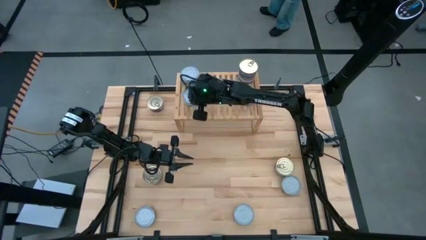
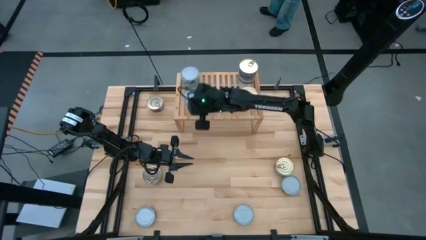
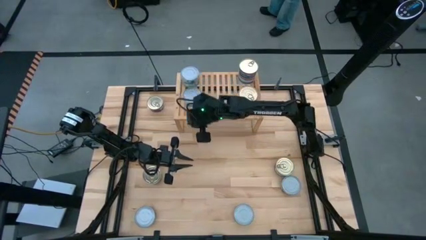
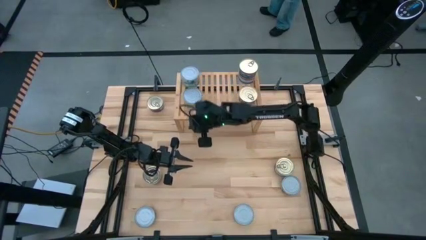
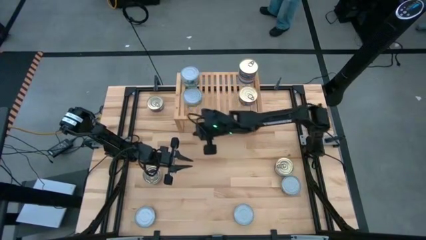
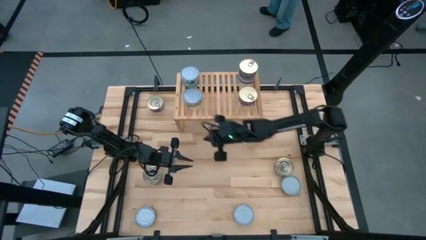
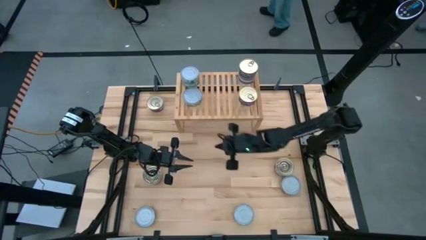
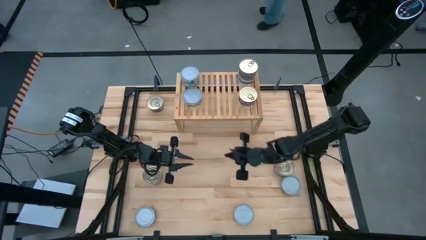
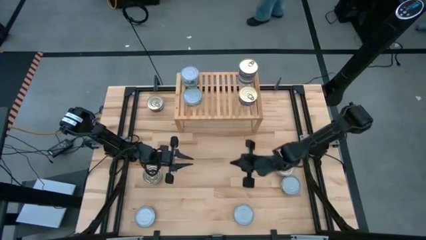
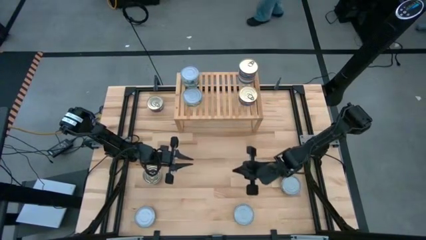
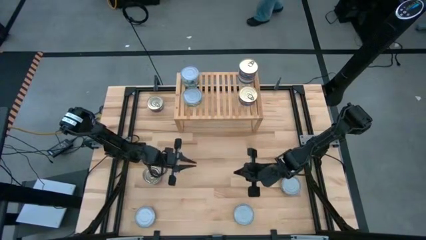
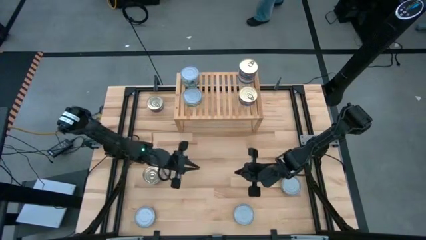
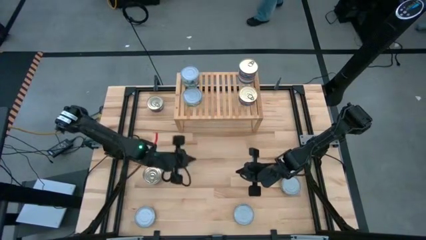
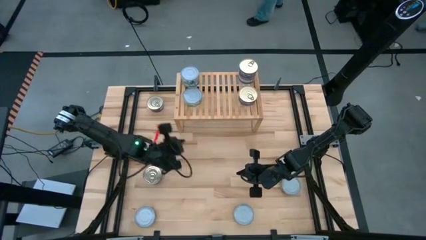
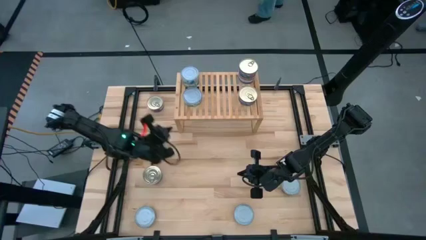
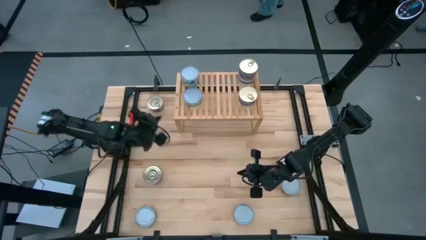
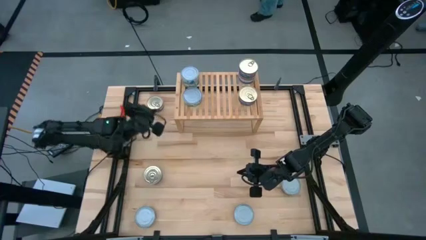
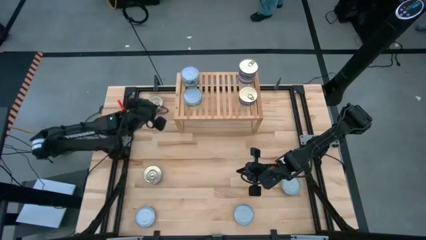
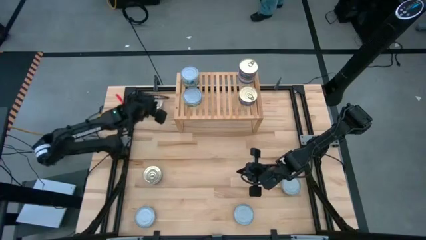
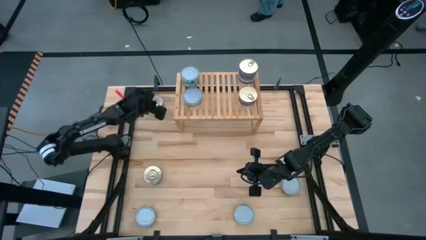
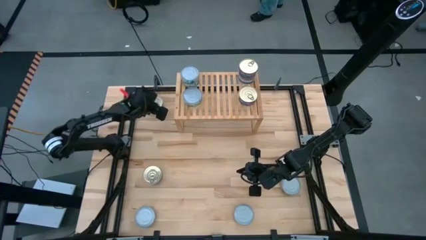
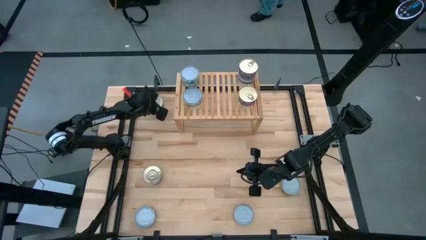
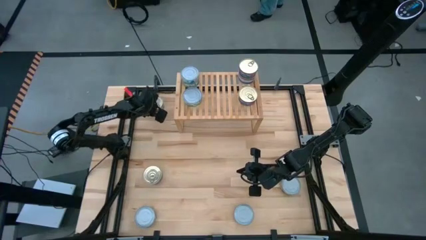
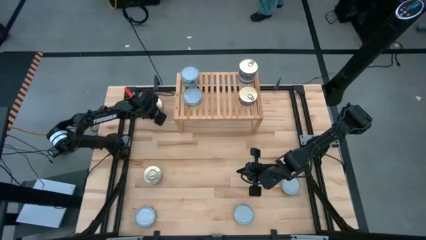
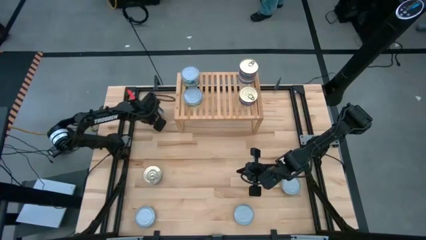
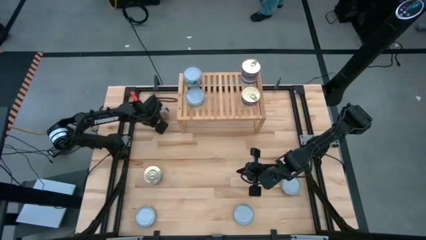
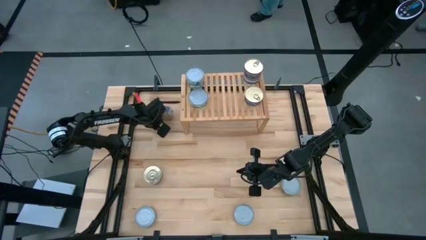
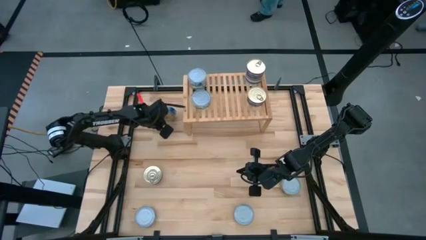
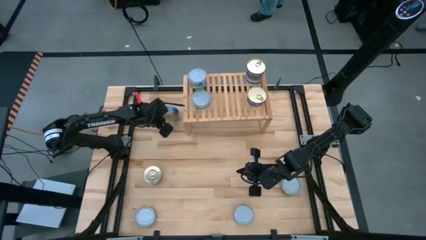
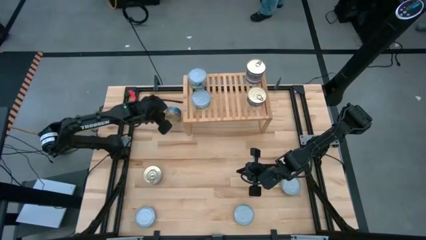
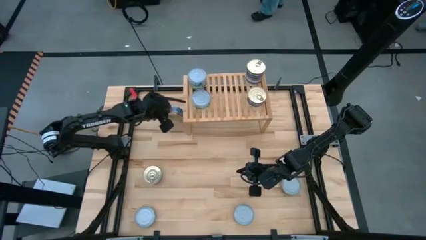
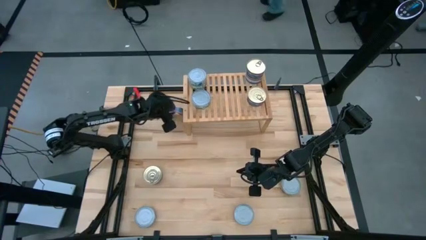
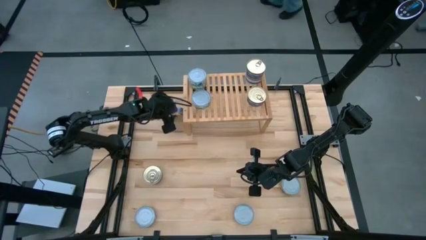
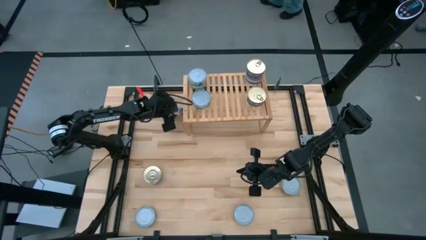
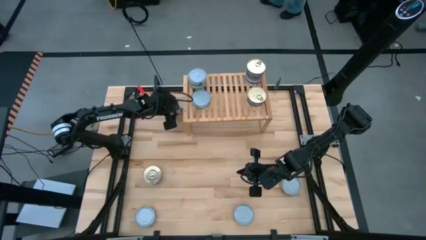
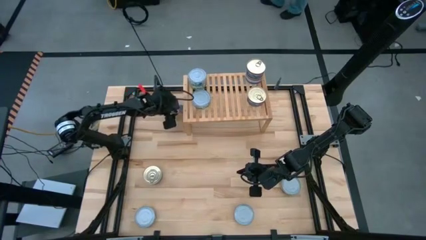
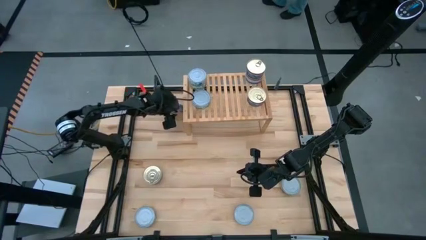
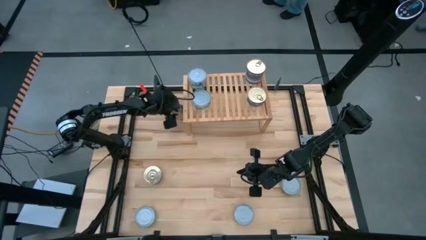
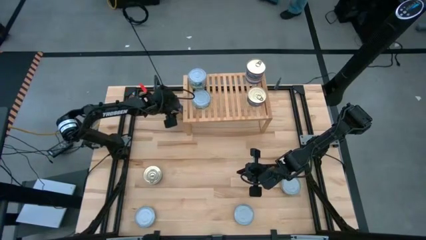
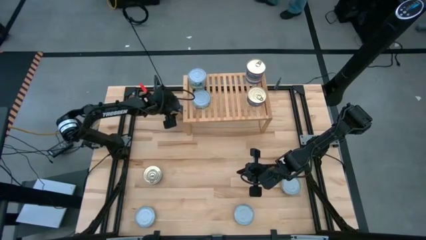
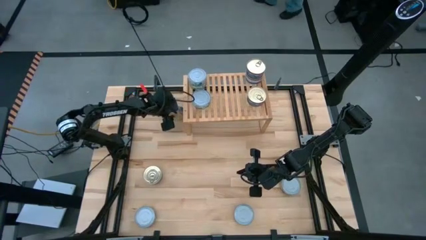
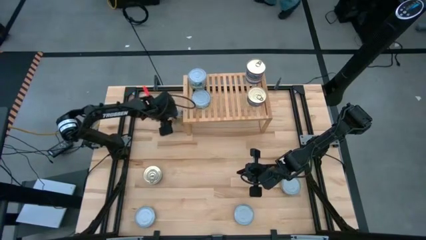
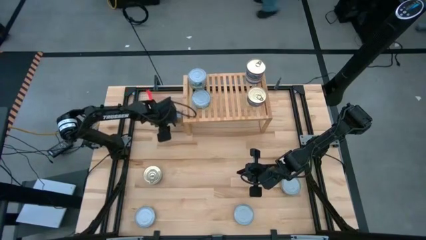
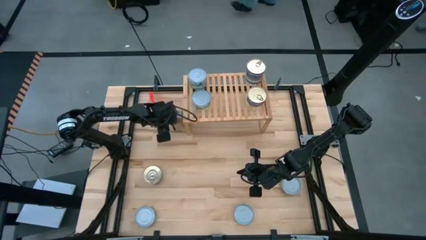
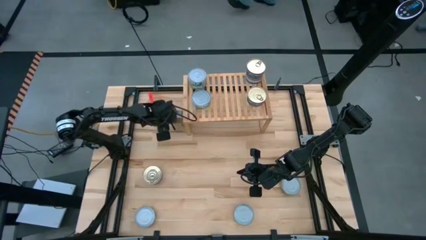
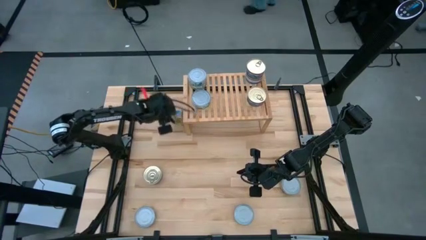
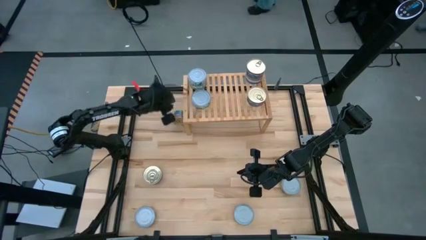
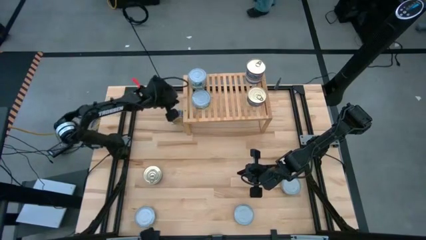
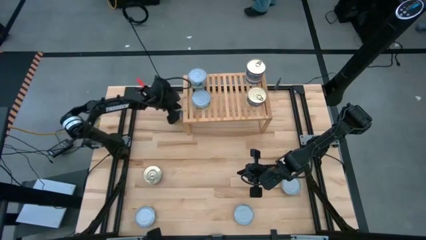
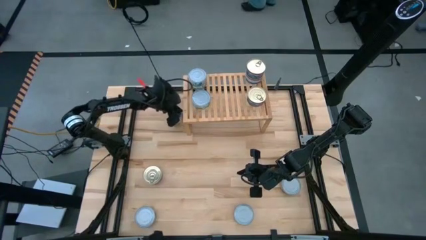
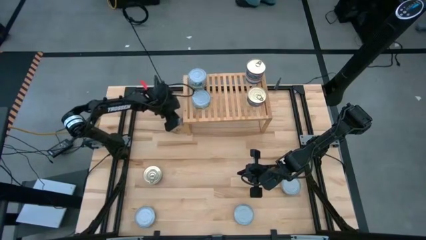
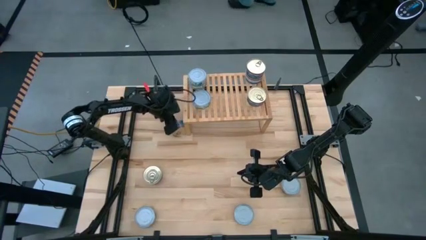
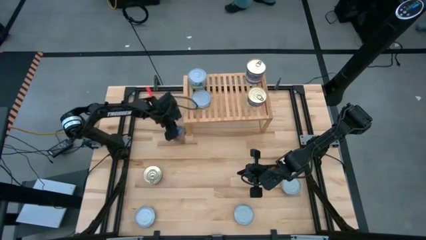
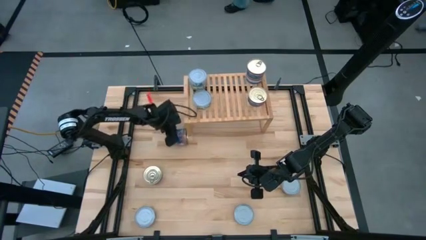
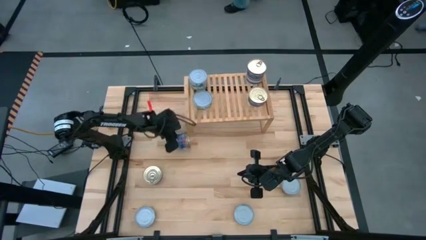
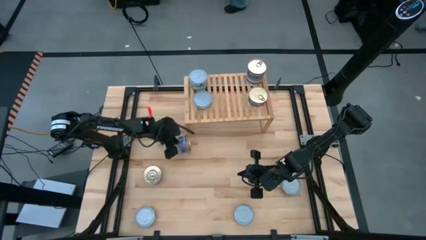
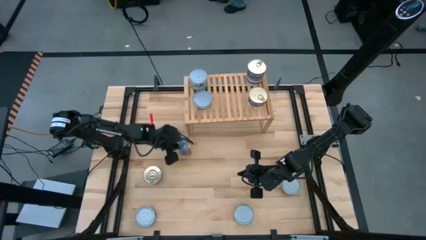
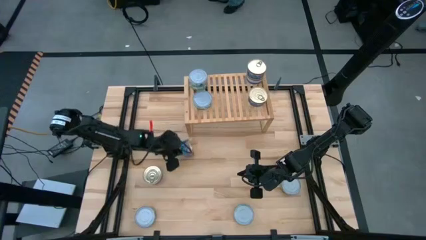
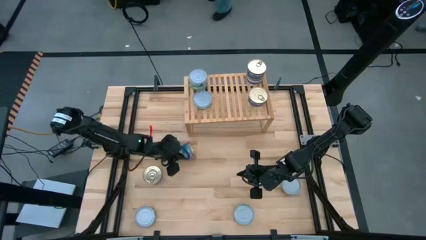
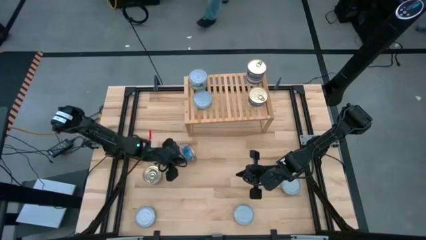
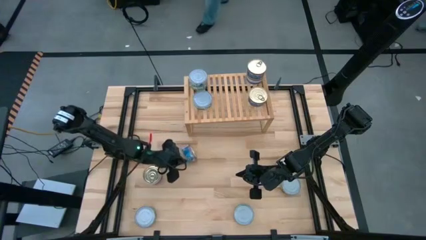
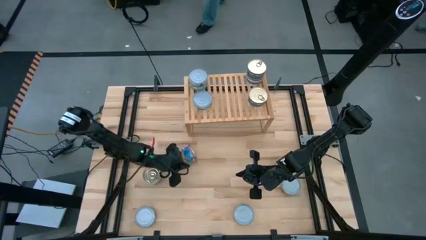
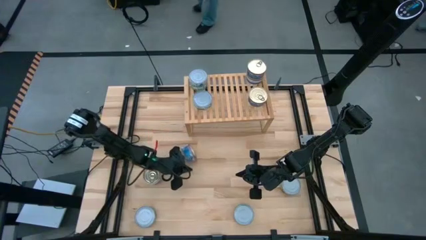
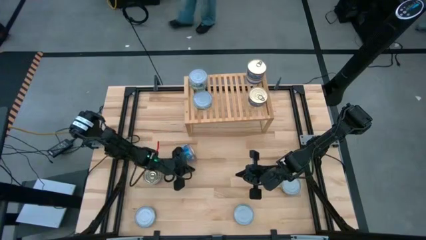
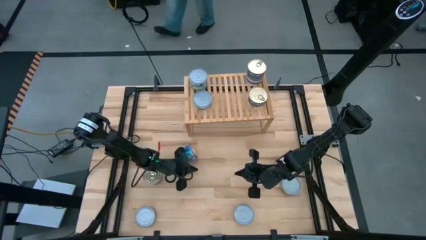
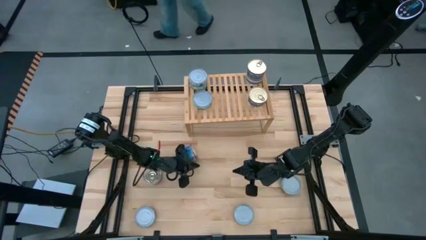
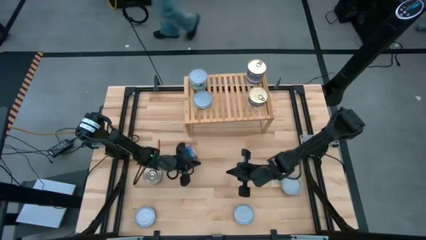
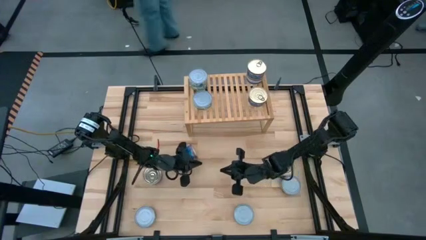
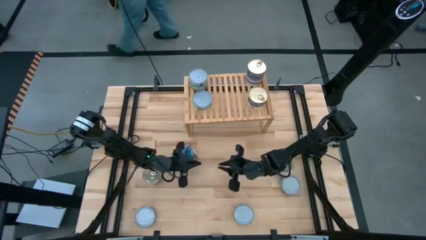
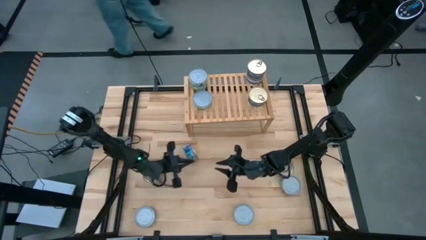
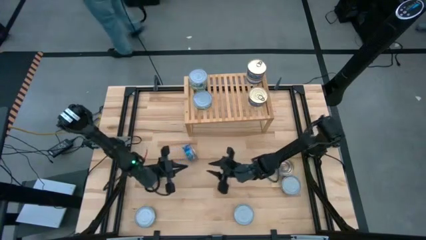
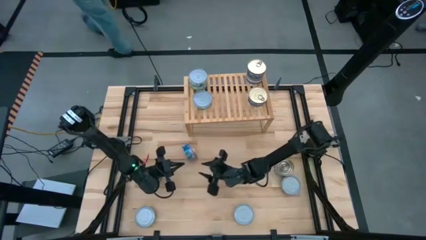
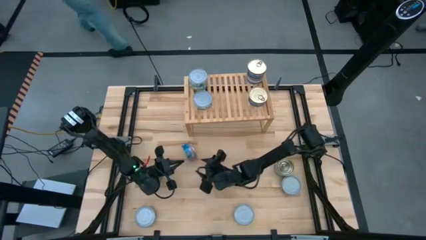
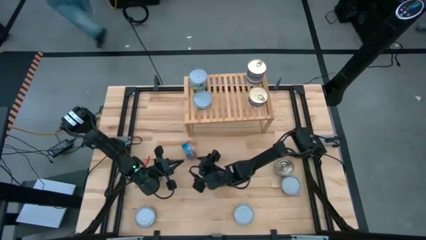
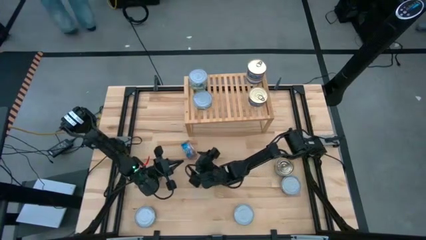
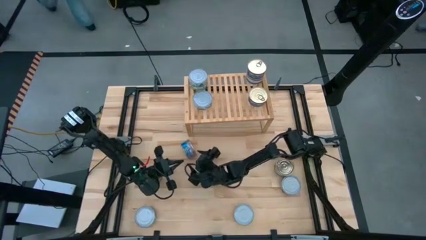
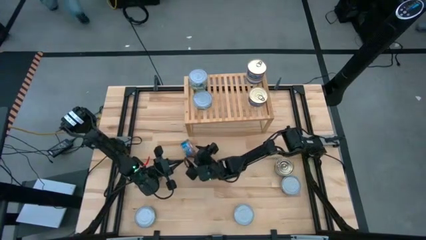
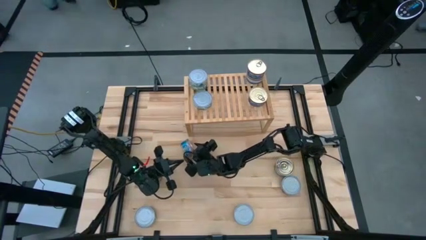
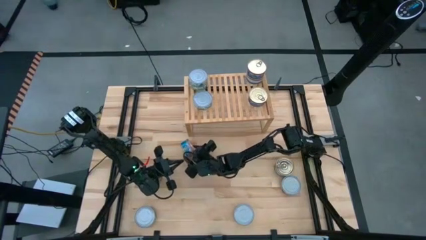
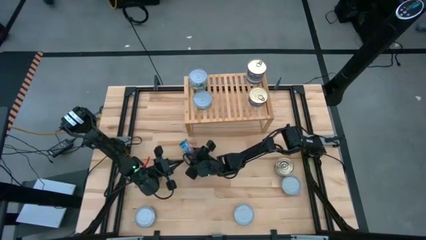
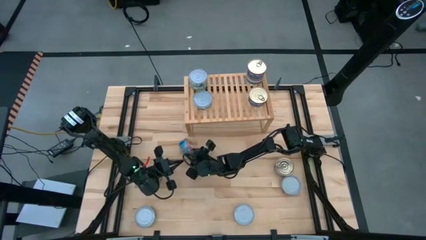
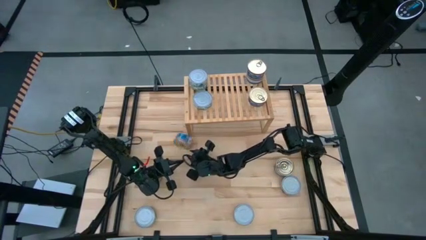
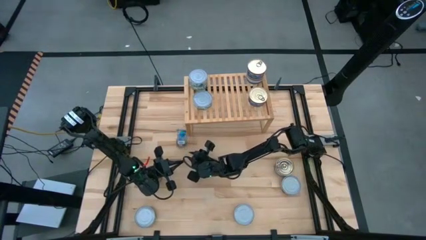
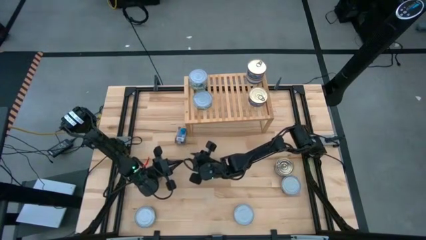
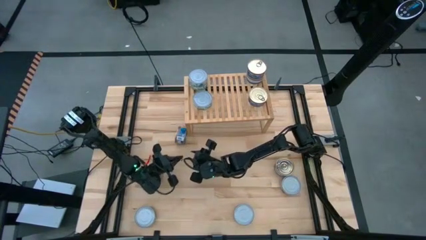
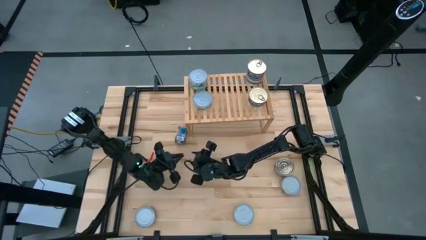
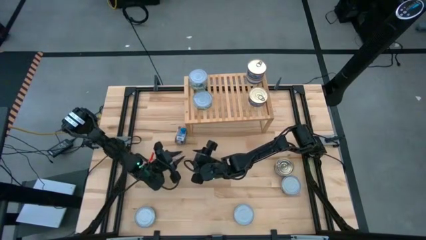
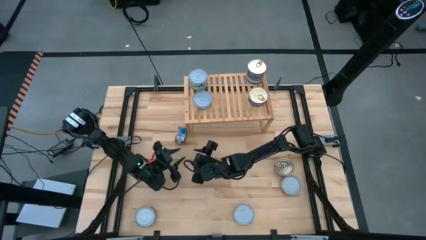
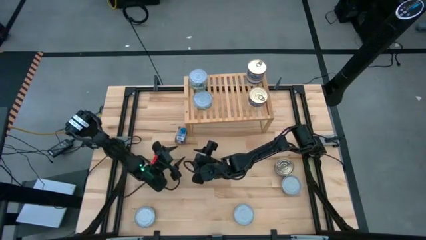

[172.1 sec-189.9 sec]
Task: Stack canned seafood by type on shelf
Stack the blue tuna can on top of the other blue tuna can on the shelf
